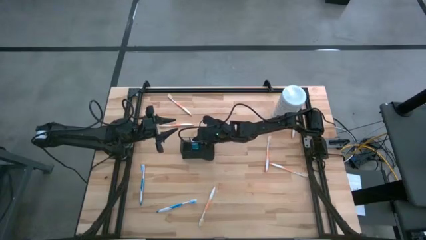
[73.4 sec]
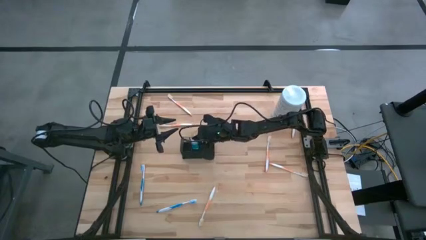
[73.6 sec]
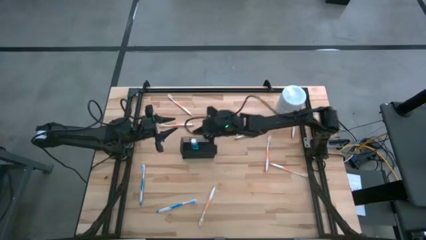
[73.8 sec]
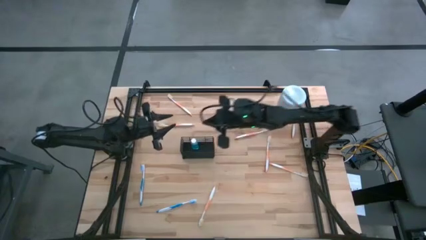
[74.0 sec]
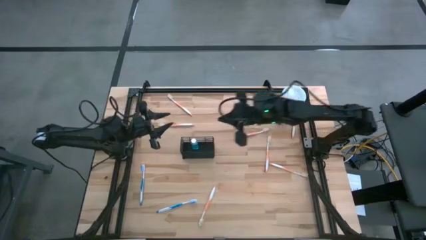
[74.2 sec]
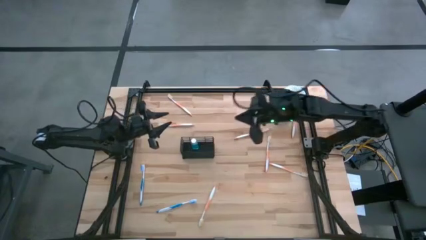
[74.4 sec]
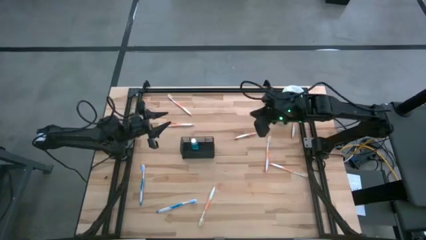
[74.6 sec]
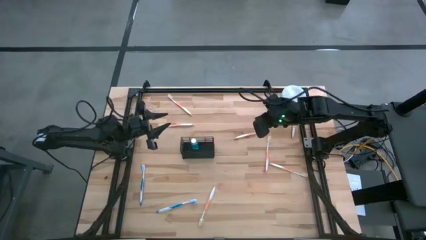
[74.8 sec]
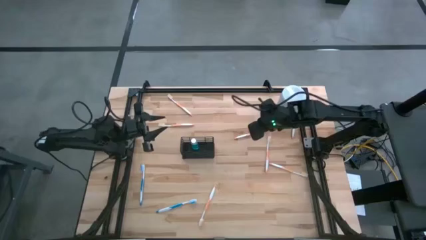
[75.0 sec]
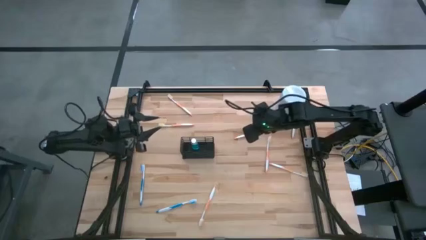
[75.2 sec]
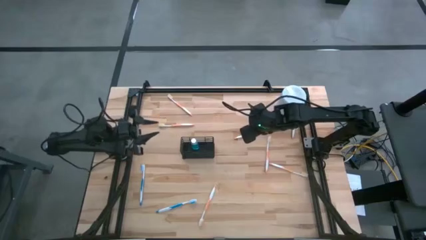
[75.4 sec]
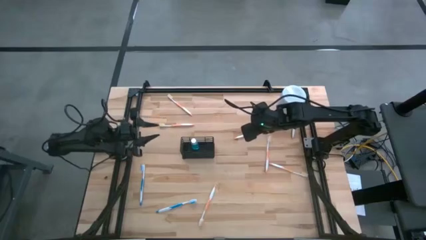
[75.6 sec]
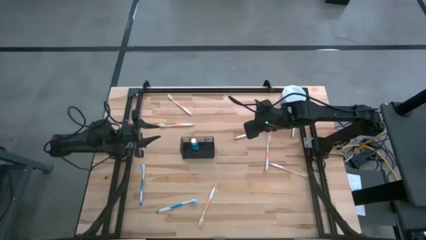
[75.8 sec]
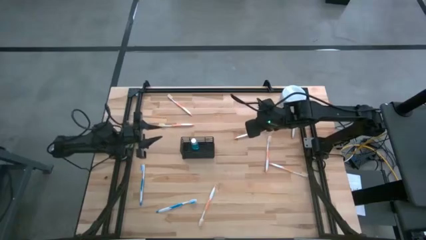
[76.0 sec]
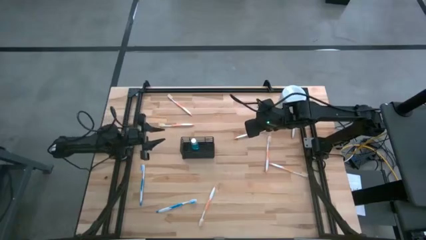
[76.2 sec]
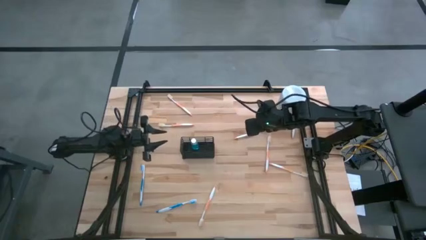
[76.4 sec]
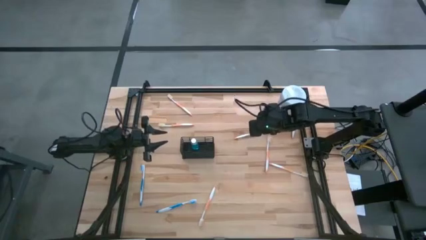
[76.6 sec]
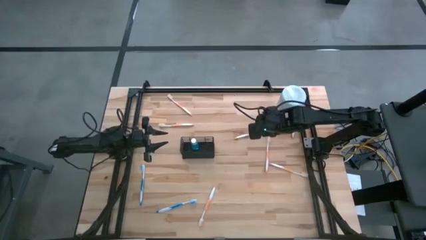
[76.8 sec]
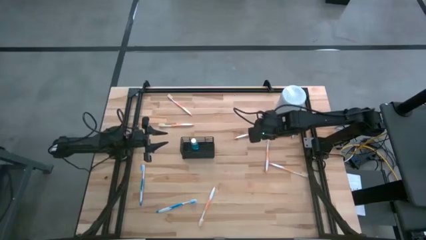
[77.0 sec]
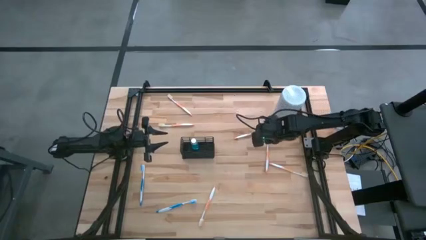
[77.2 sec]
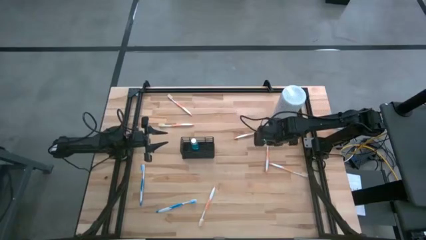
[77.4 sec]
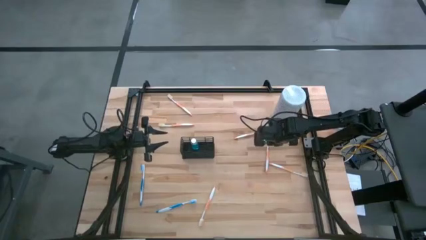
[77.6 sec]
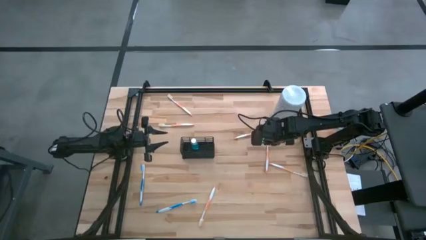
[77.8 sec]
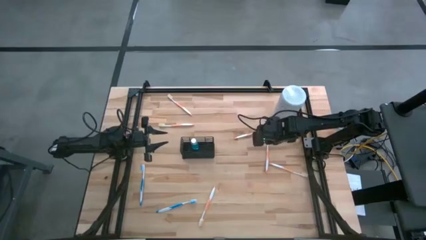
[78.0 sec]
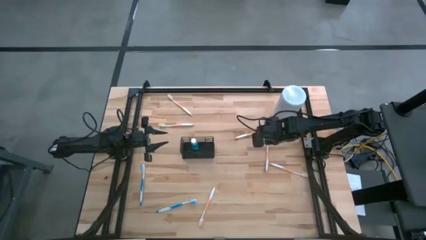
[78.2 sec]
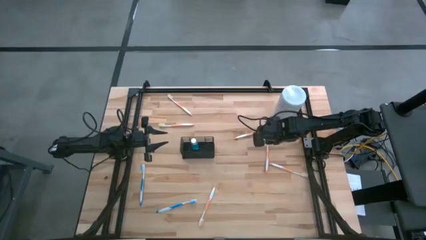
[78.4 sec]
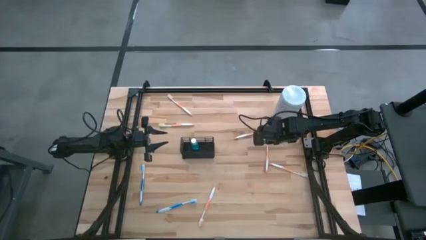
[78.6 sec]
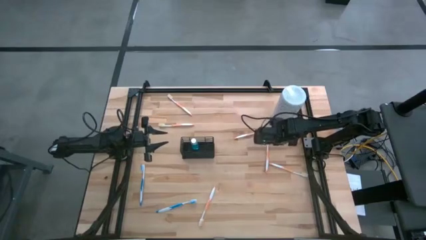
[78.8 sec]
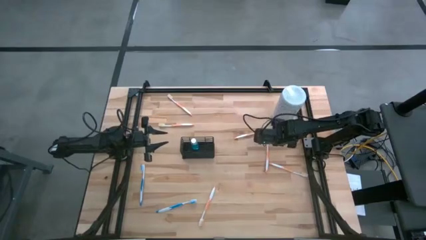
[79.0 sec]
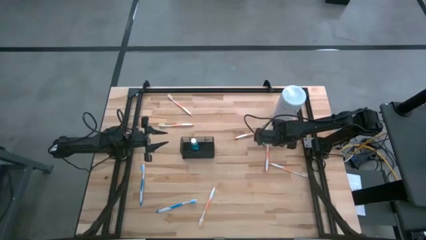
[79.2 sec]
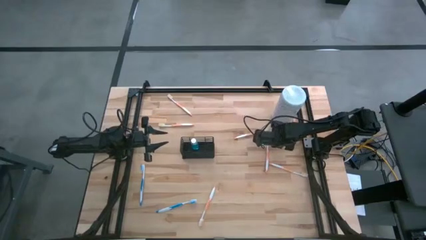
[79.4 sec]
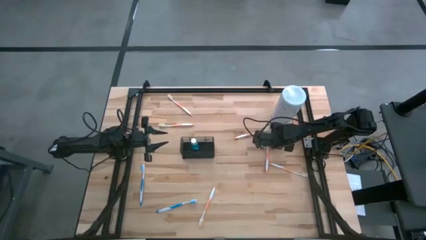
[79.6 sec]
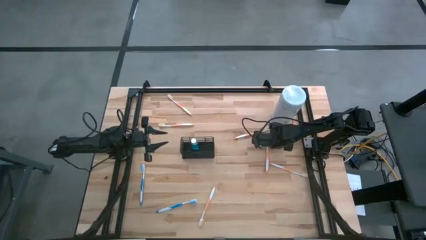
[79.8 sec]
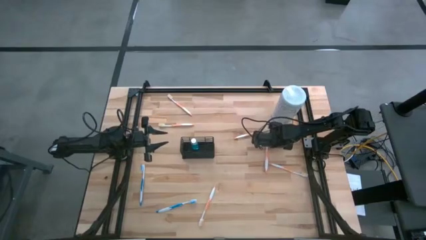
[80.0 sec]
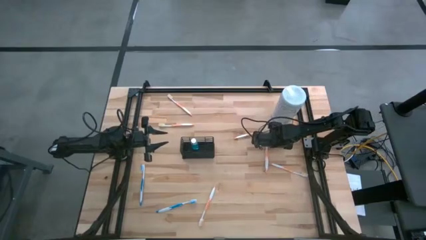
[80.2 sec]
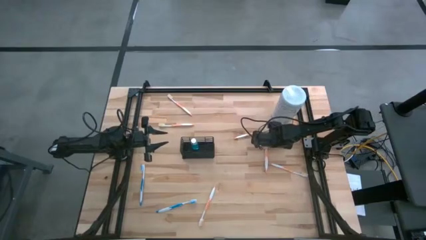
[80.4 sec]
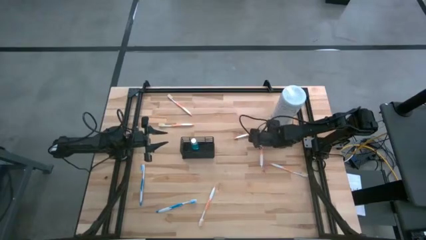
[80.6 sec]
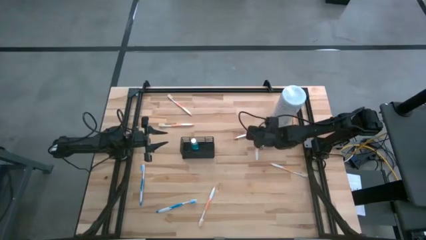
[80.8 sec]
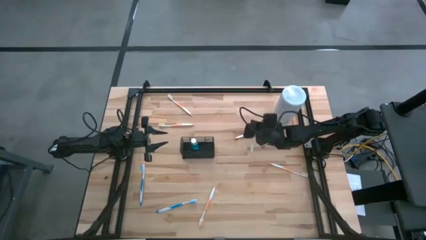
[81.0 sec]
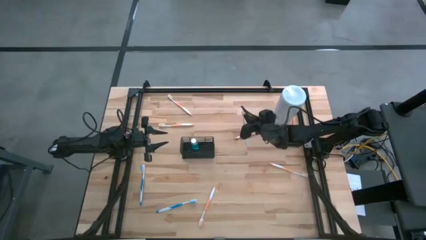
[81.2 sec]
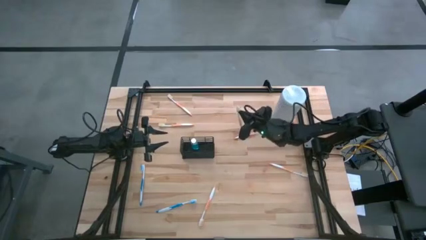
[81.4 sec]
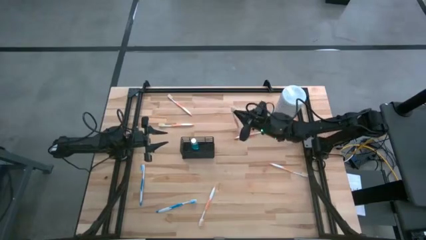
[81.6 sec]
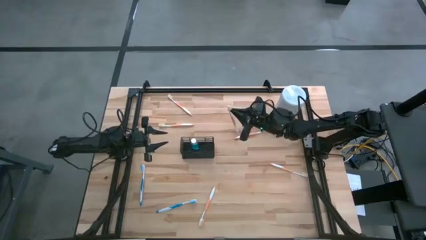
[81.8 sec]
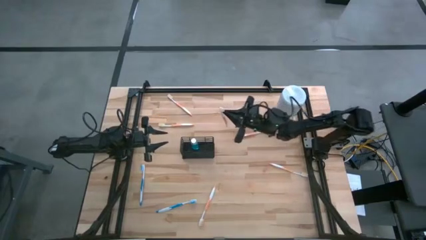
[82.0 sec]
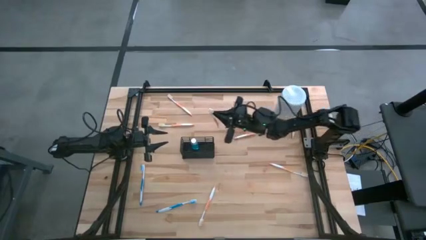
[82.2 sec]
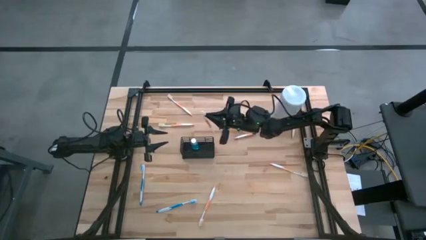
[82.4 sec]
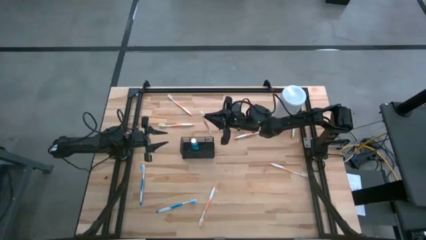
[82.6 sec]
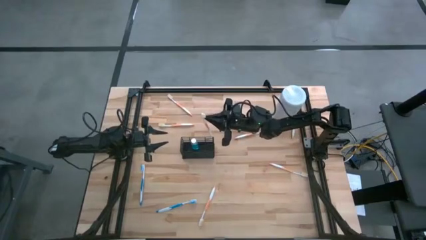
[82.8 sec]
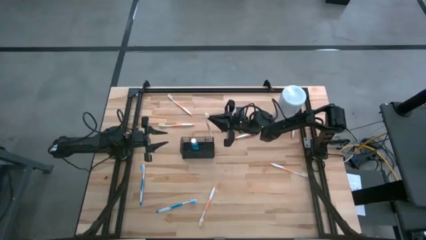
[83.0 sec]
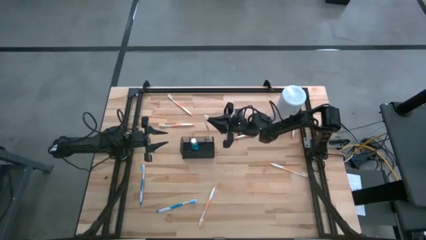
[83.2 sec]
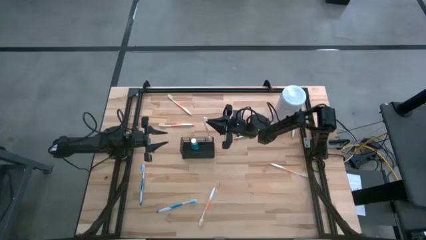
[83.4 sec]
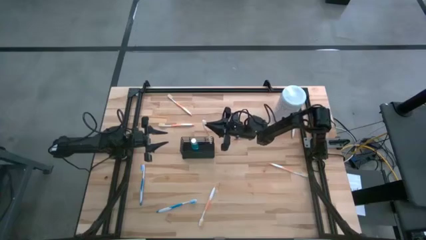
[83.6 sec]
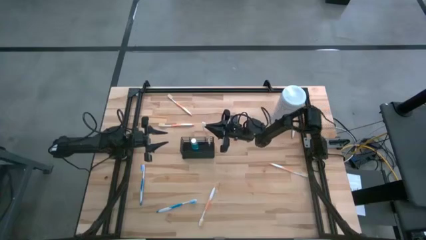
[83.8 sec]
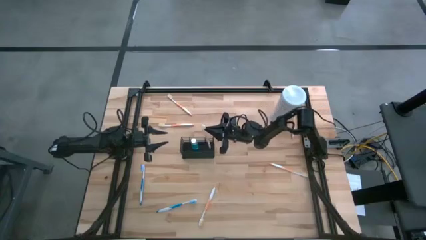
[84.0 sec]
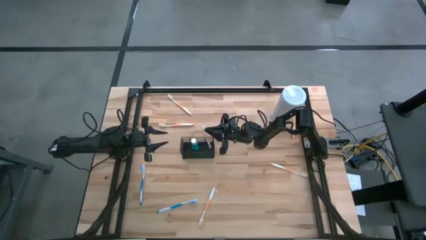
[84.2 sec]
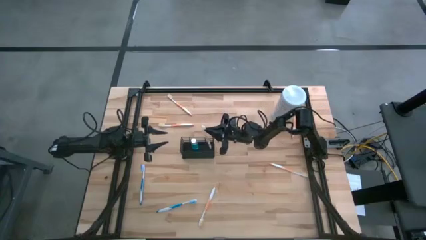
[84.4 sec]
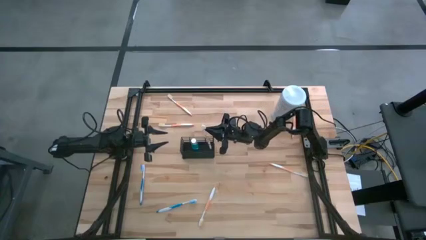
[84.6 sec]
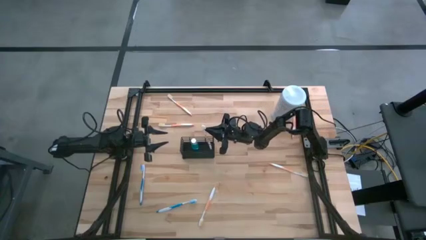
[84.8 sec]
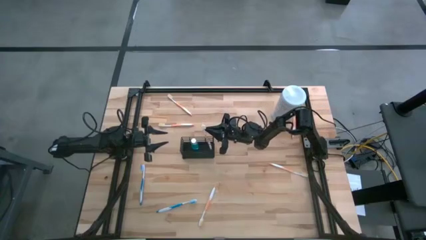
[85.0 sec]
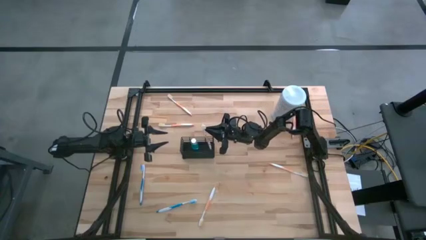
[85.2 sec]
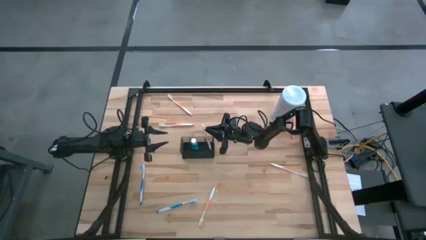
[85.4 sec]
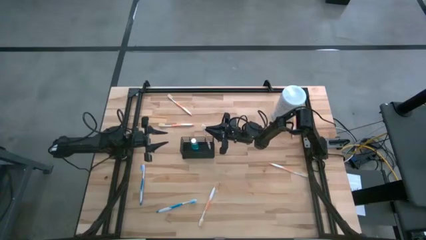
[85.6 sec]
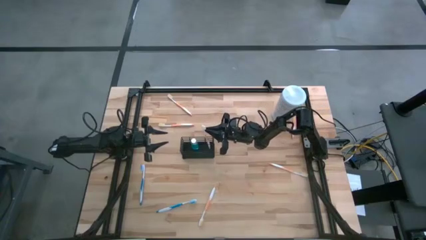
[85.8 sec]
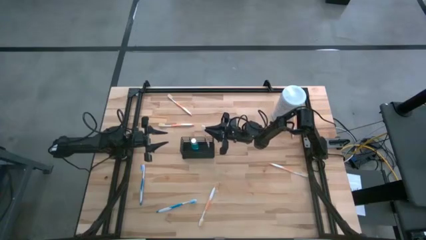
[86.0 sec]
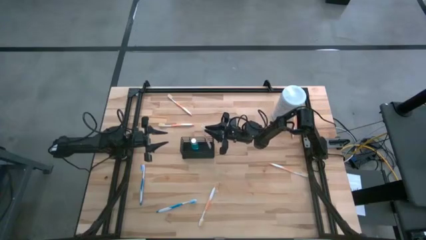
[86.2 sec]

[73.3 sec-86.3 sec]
Task: Pick & Place toothbrushing station
Put the orange toothbrush into the right section of the wire organizer

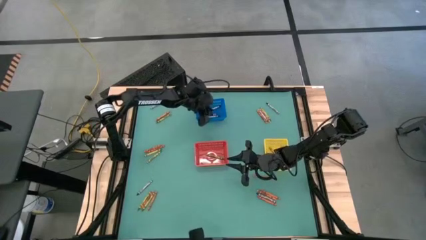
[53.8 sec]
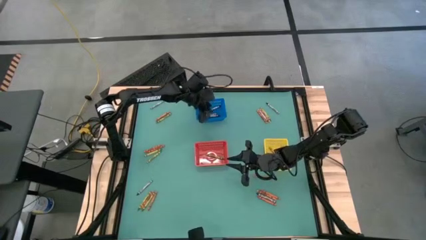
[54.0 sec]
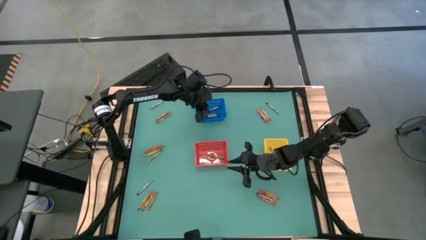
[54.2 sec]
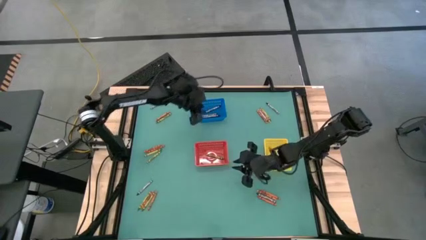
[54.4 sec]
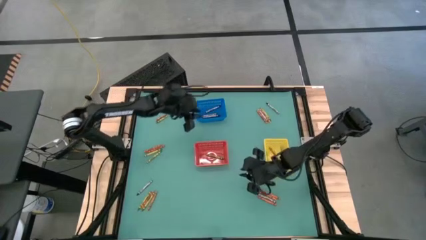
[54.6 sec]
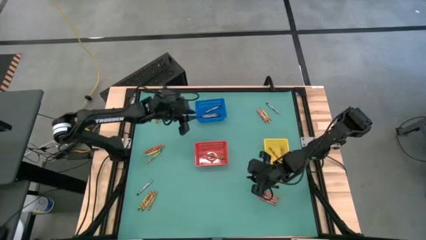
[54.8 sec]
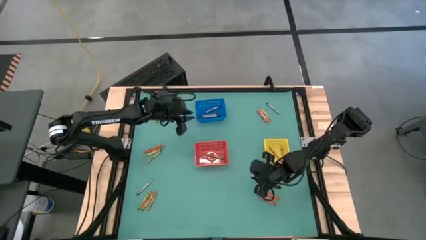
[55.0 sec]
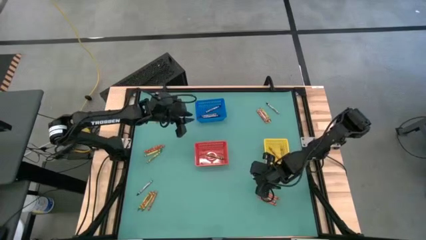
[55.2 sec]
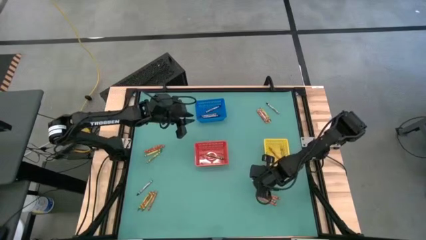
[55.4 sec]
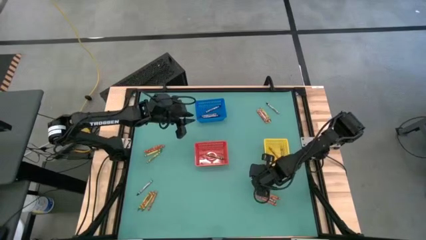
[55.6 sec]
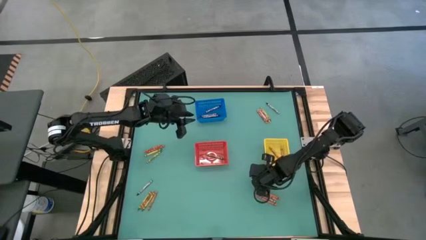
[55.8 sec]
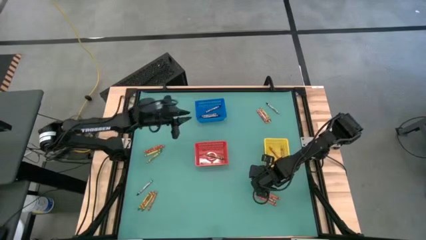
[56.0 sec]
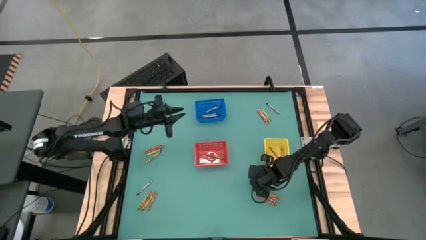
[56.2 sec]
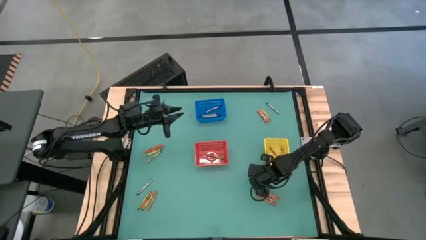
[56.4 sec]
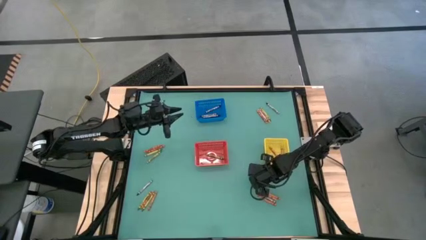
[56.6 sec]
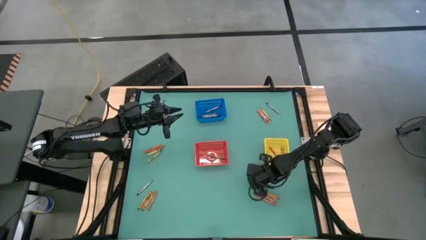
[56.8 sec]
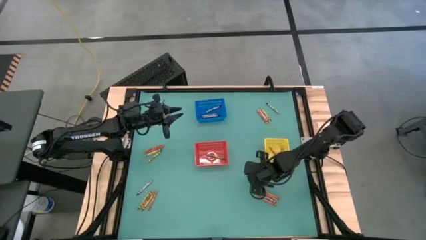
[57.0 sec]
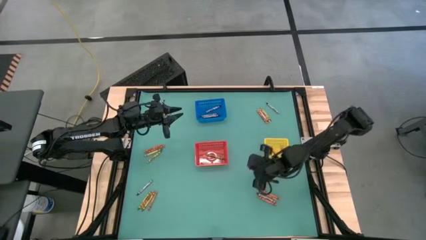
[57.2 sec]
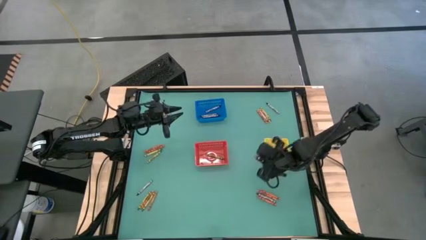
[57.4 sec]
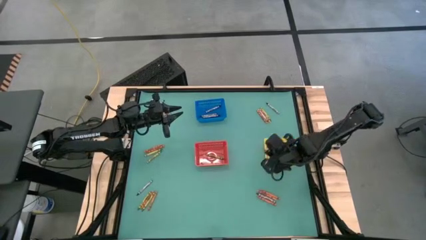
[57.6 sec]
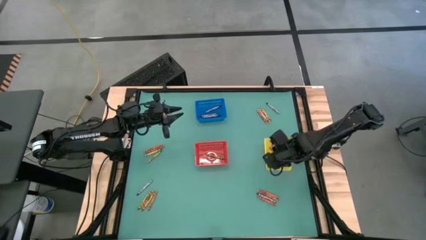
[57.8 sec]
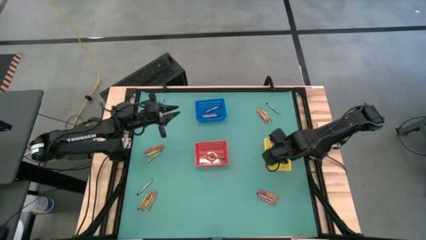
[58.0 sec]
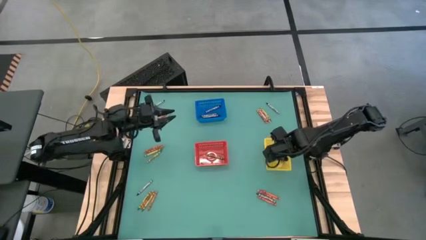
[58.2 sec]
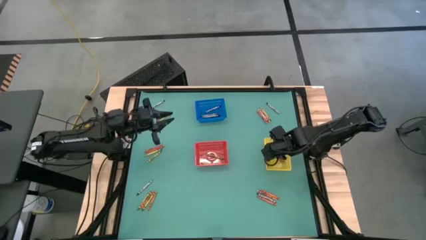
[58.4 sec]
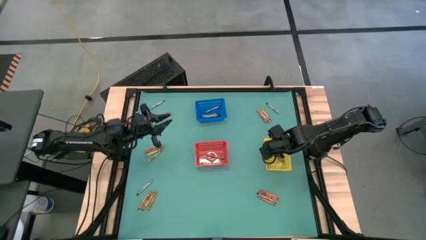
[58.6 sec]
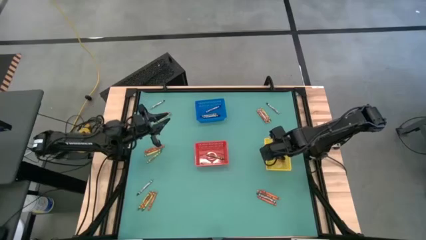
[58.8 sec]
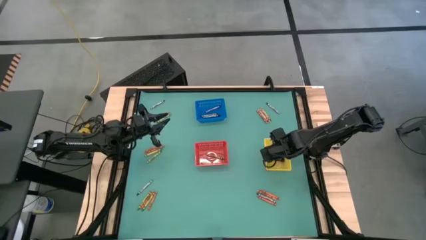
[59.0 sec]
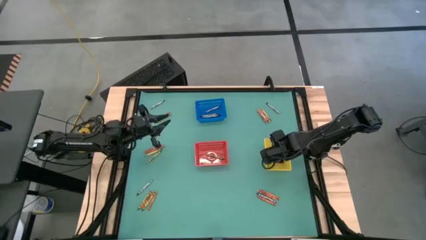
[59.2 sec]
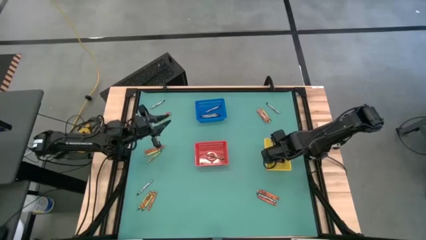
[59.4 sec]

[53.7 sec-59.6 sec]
Task: Sort crayons
Put the orange crayon into the yellow bin
